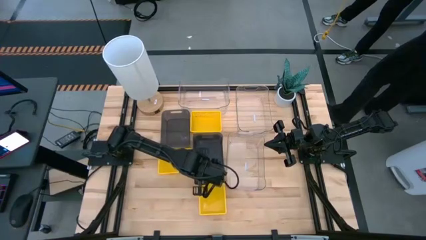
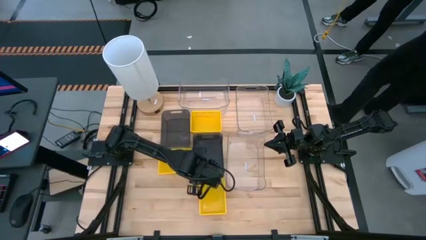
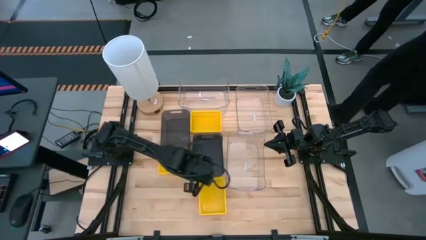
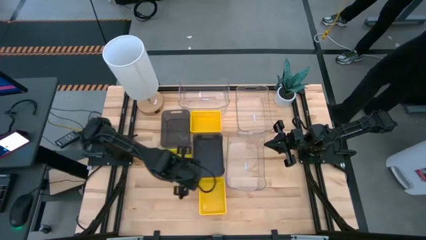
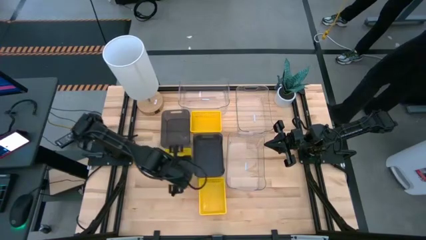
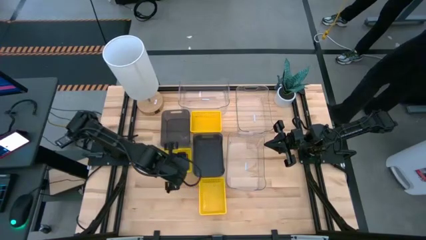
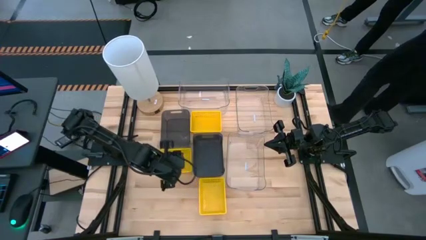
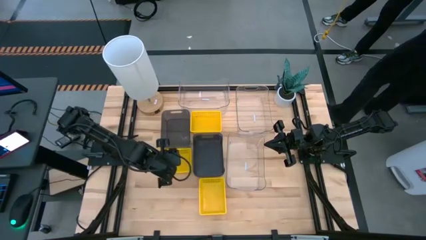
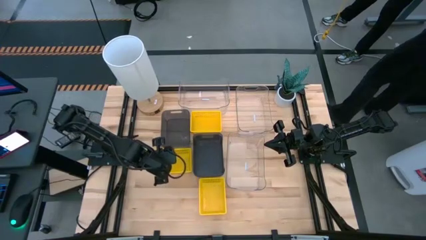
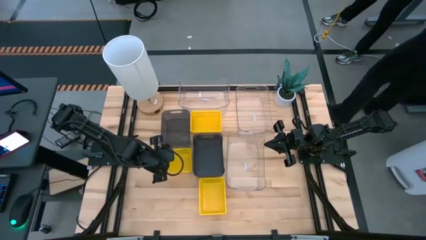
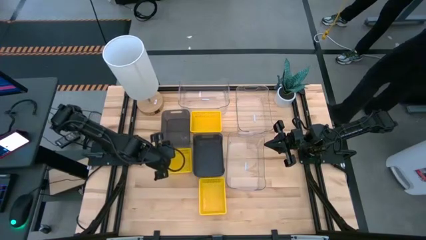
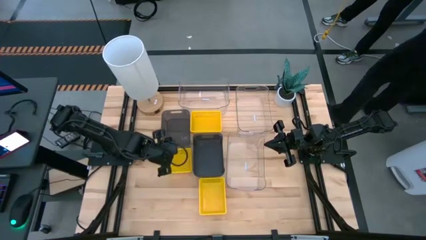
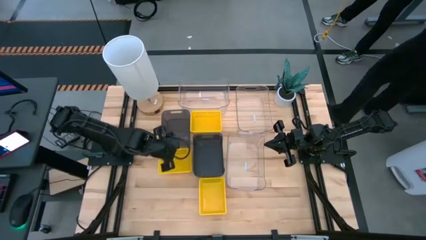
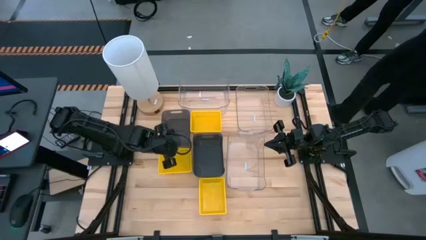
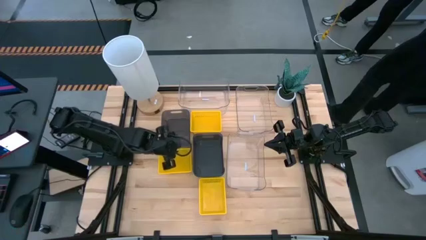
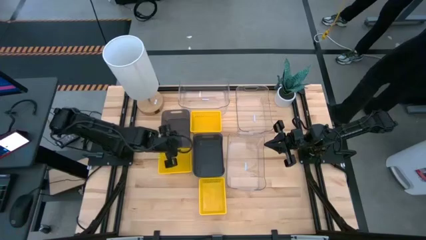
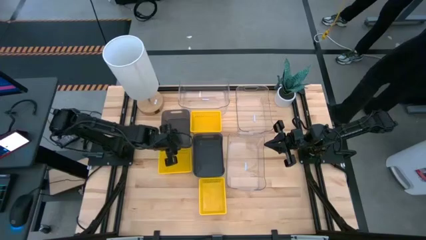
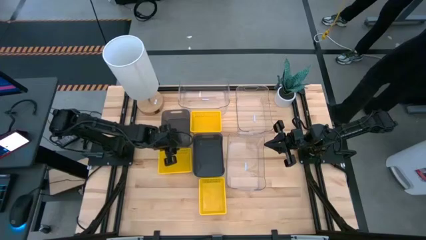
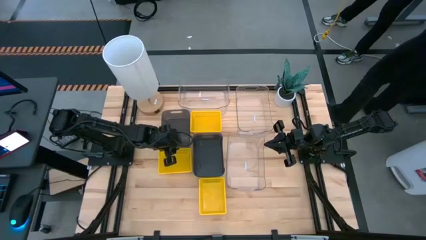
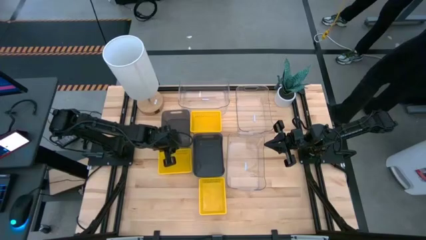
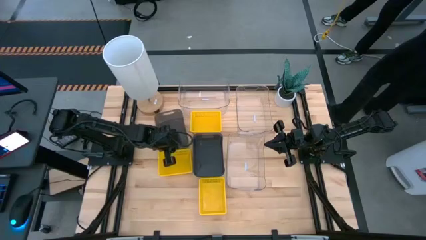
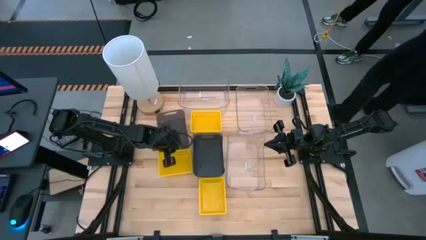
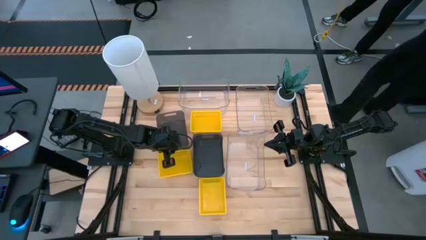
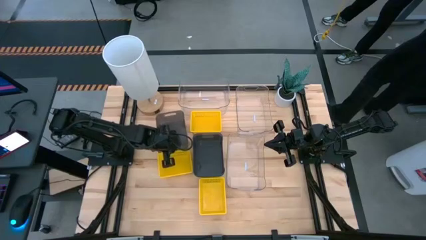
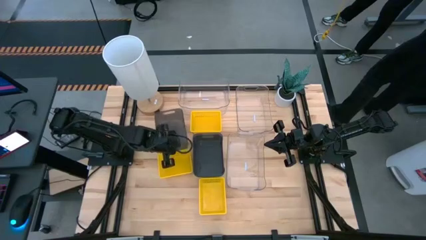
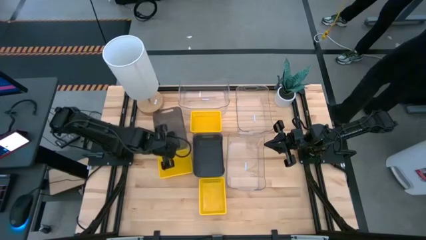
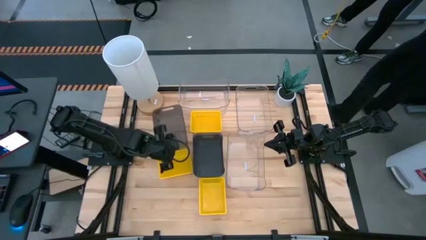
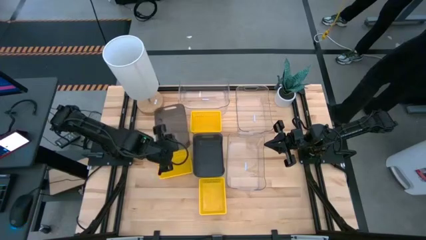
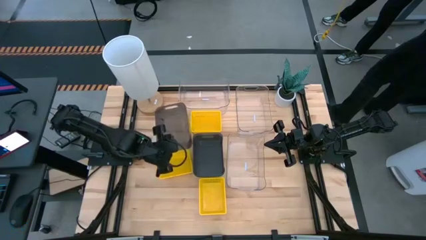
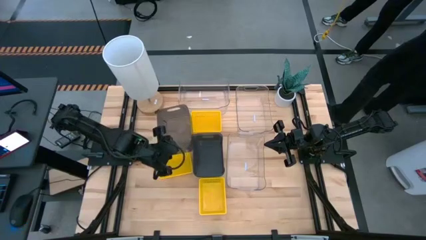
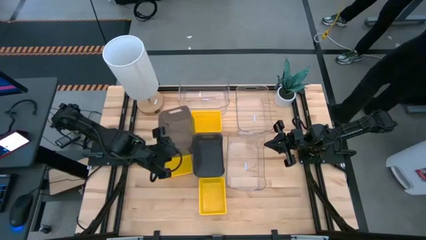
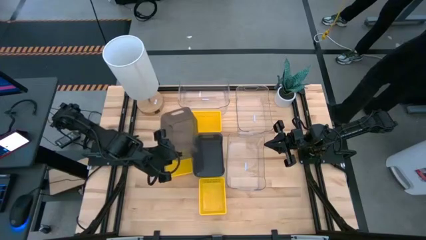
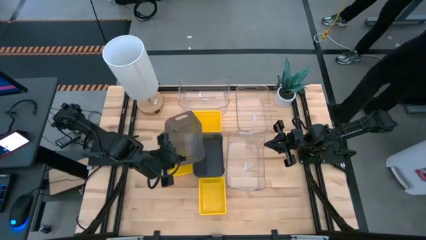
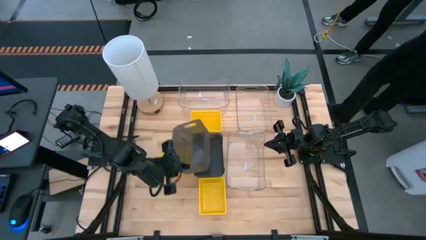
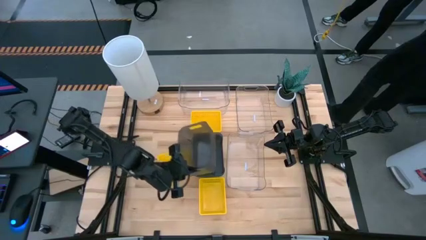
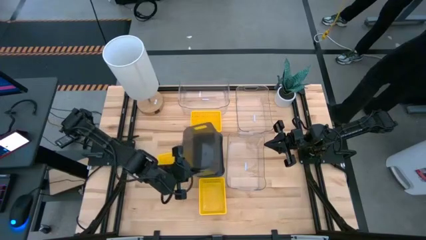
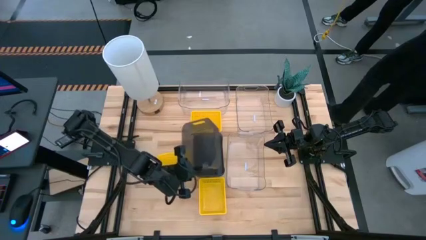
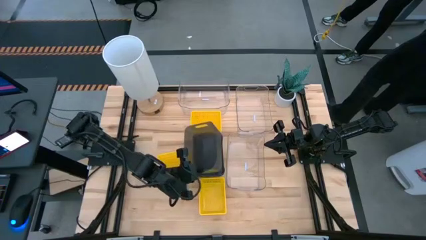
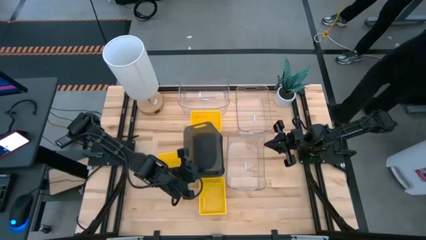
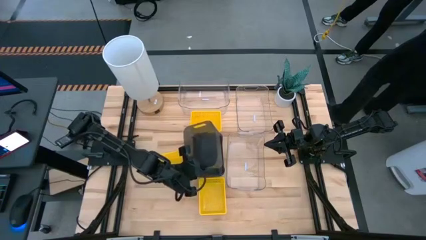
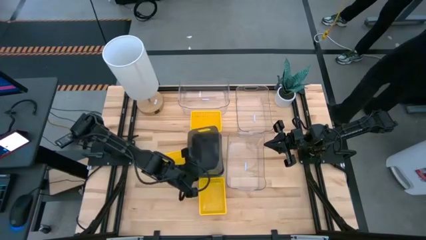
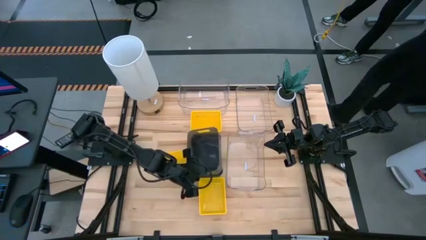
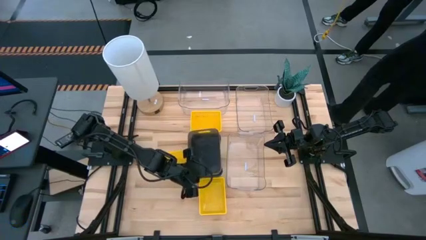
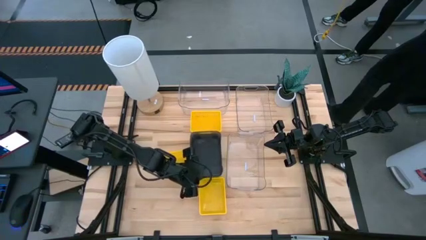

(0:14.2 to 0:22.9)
Stack the left transparent black bin on top of the transparent black bin

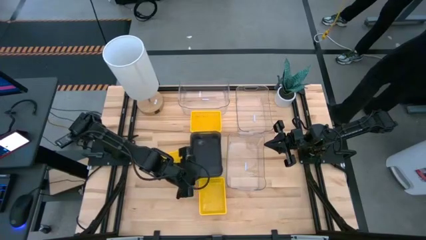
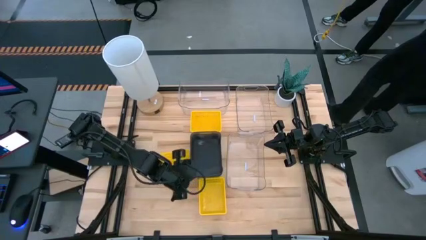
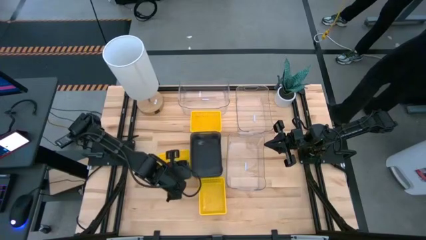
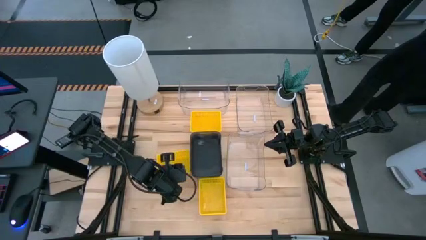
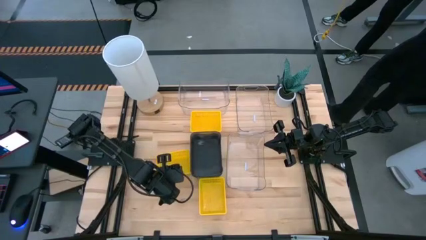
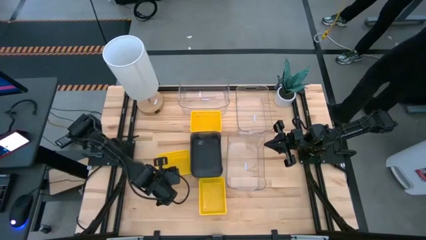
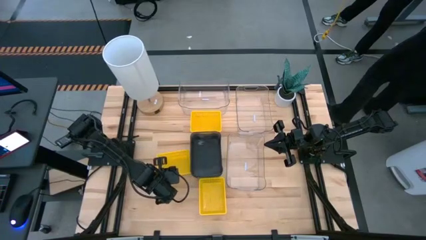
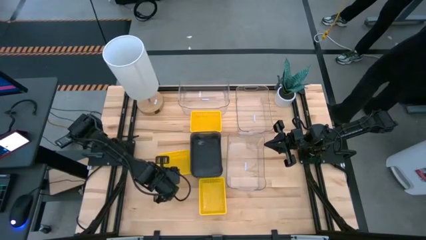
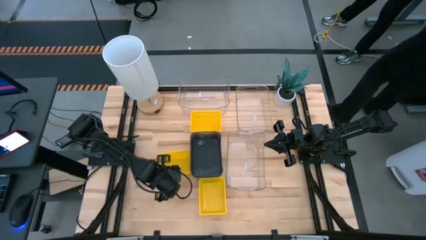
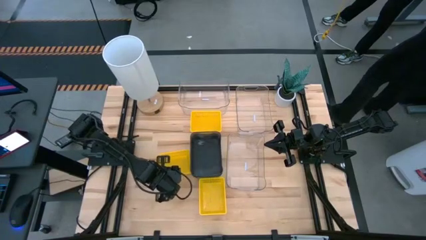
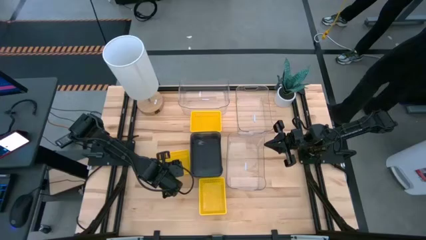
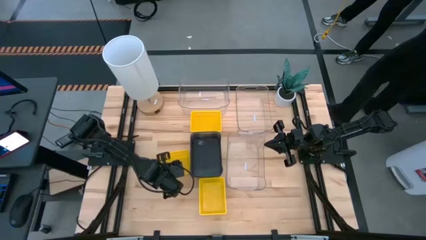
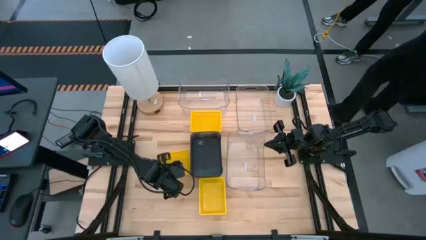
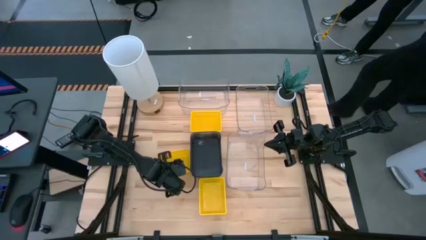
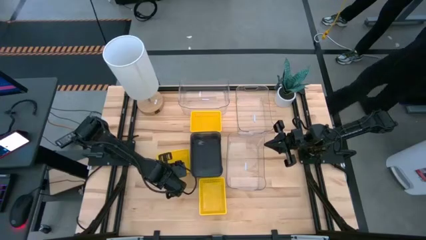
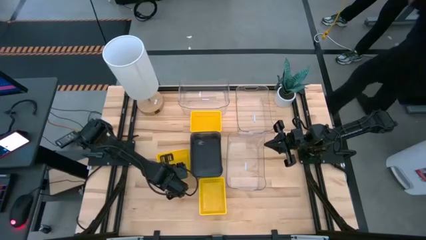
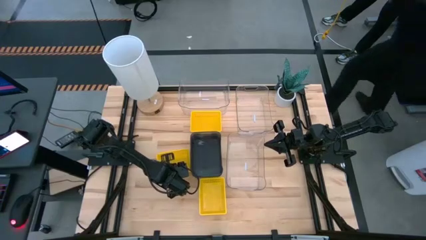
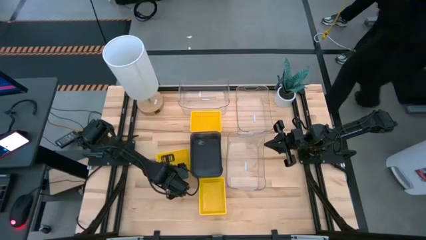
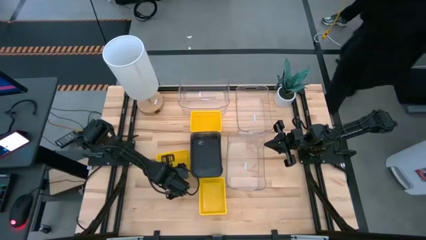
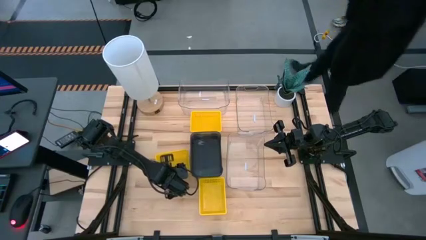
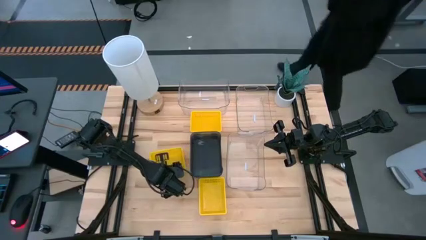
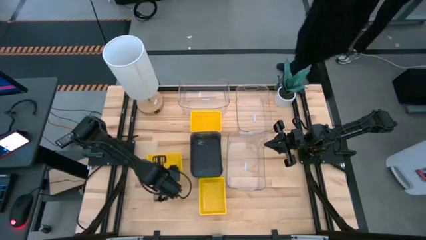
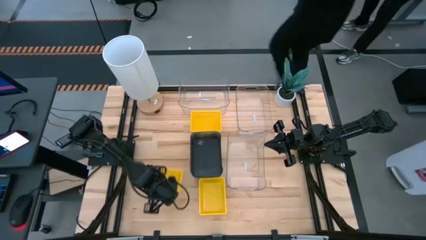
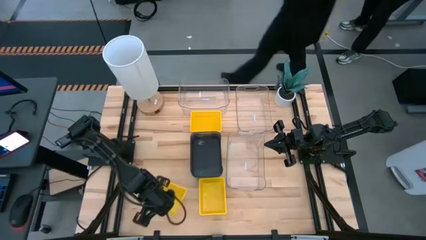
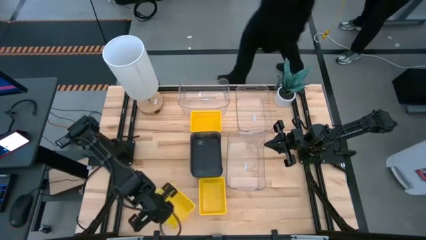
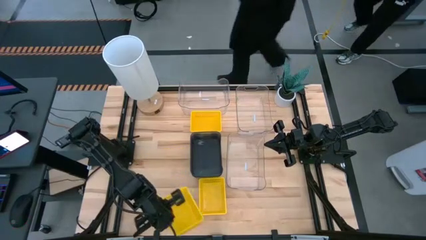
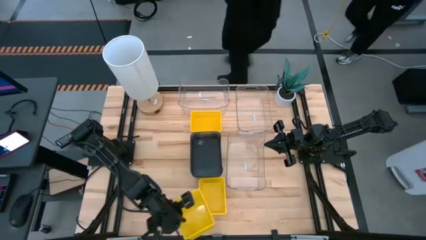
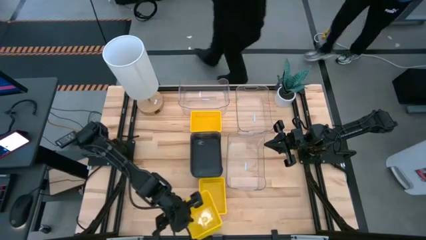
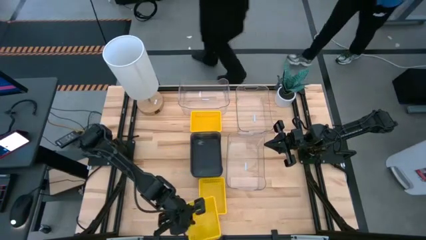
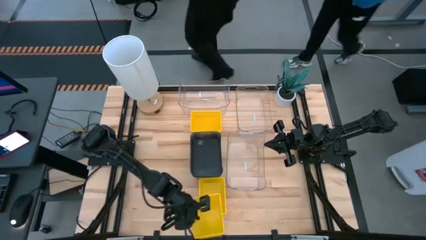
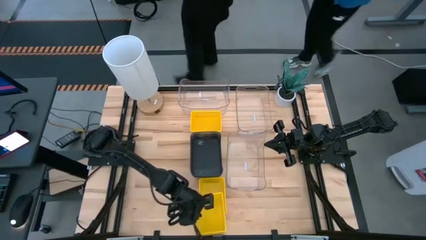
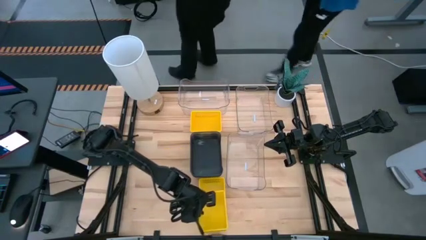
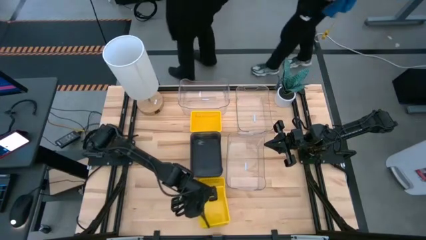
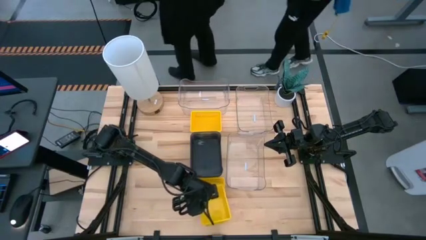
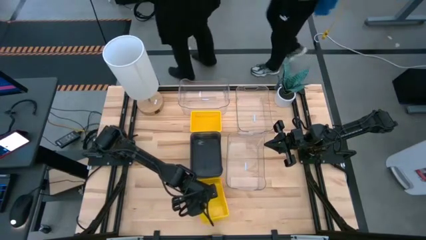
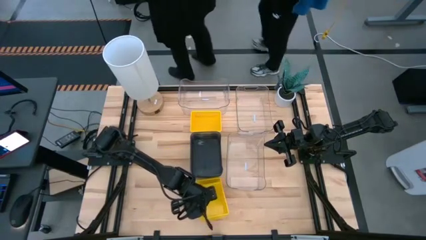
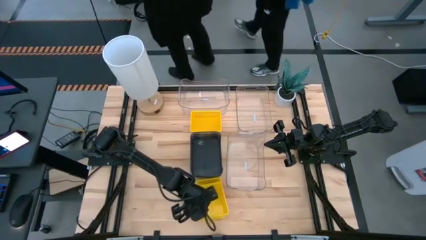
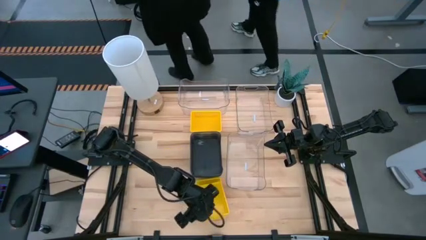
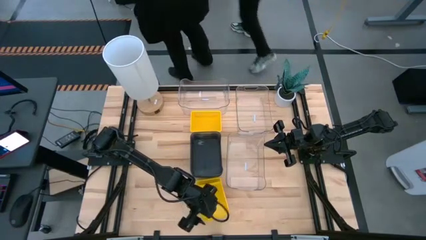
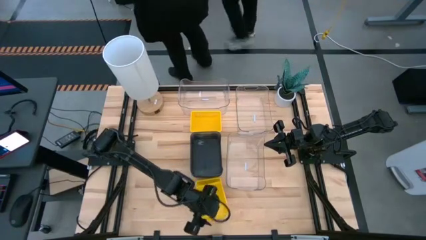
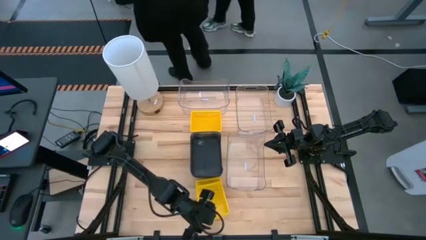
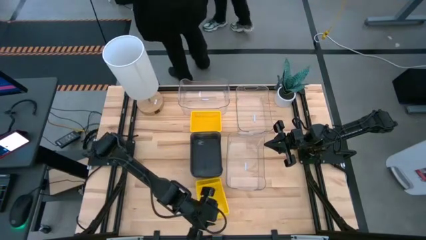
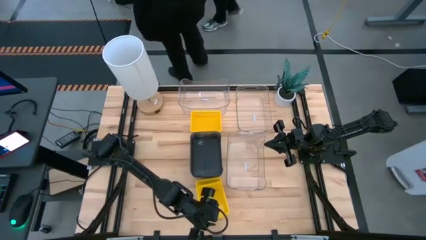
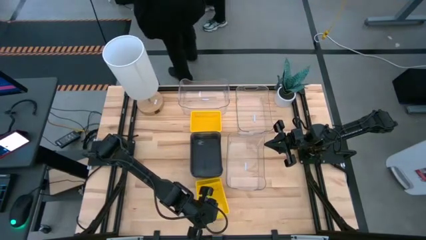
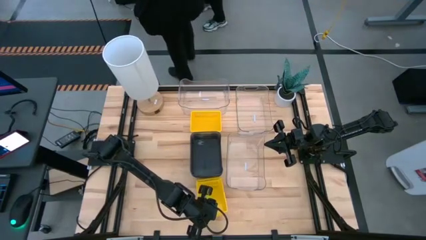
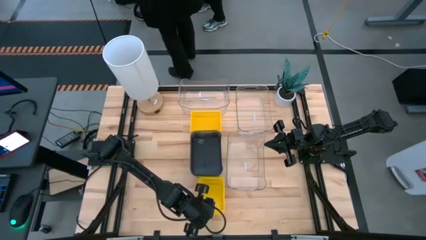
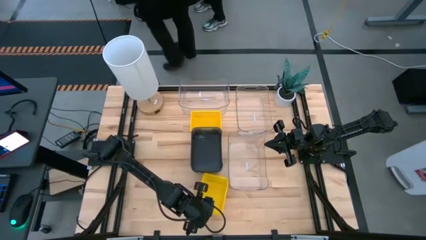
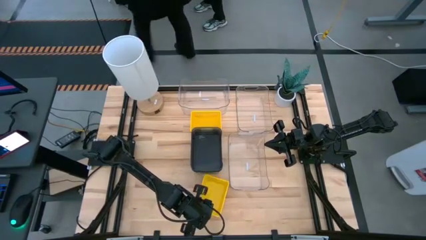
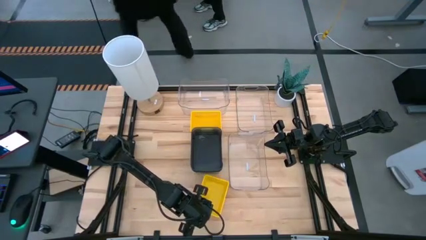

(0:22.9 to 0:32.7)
Stack the left yellow bin on top of the bottom yellow bin
